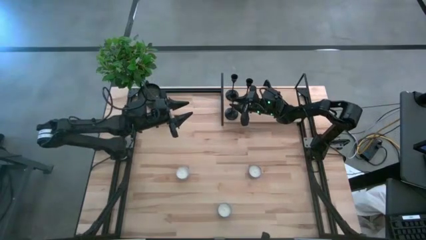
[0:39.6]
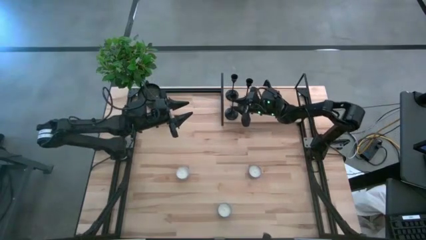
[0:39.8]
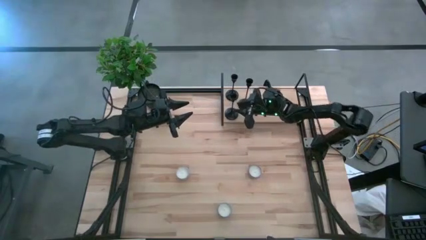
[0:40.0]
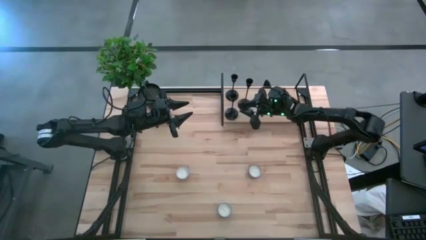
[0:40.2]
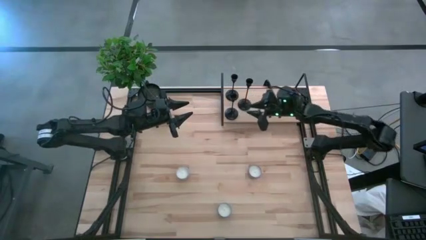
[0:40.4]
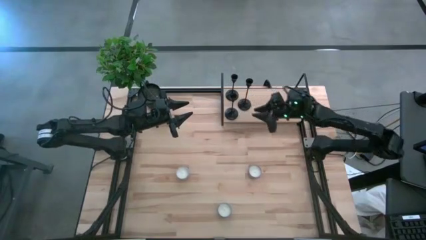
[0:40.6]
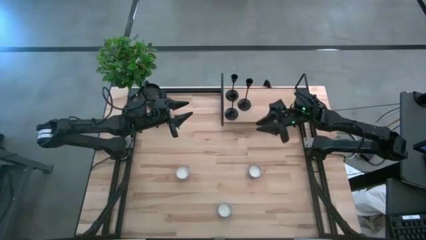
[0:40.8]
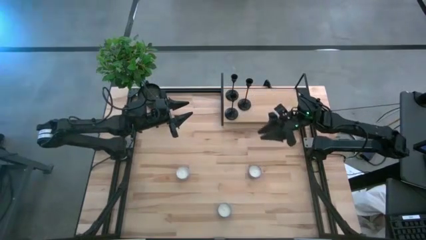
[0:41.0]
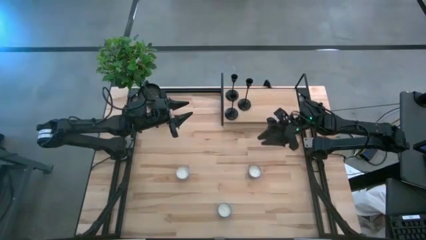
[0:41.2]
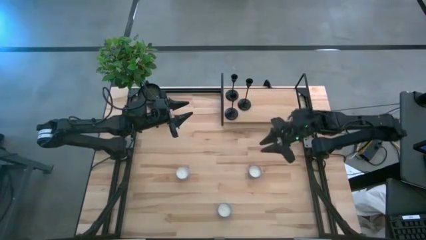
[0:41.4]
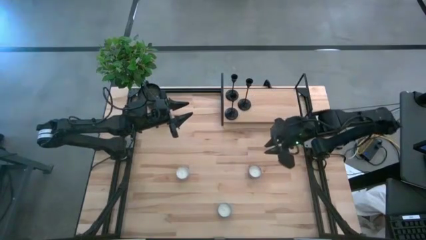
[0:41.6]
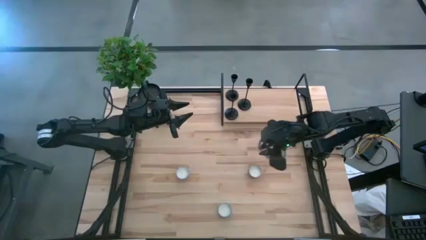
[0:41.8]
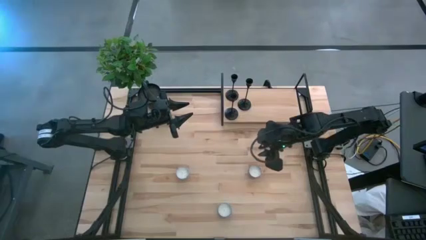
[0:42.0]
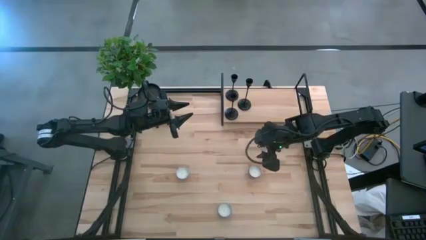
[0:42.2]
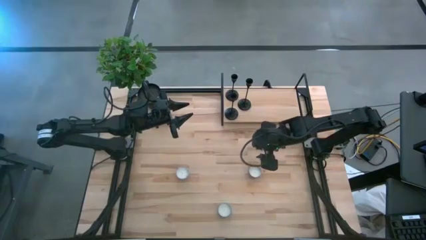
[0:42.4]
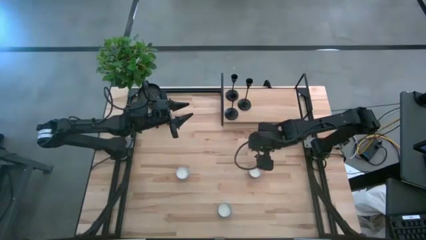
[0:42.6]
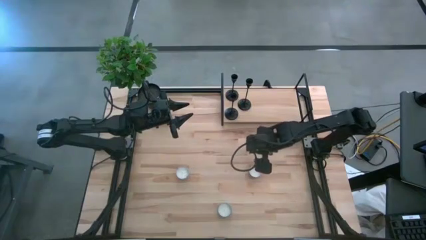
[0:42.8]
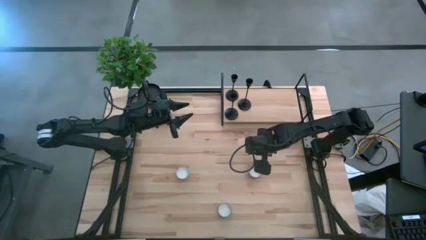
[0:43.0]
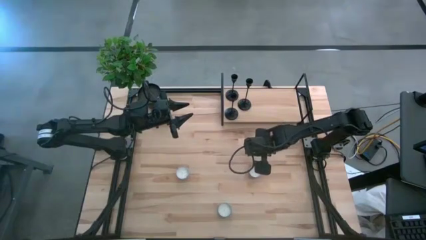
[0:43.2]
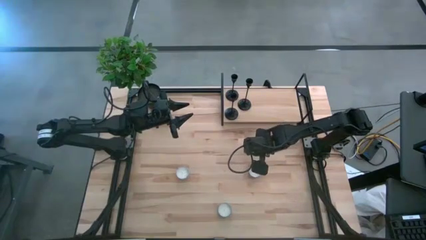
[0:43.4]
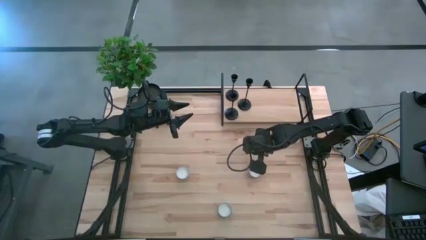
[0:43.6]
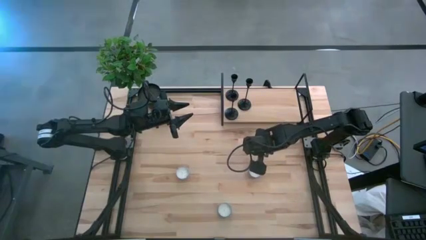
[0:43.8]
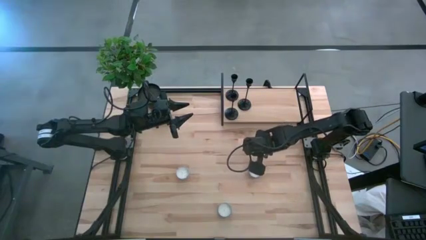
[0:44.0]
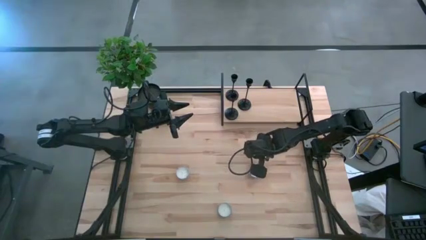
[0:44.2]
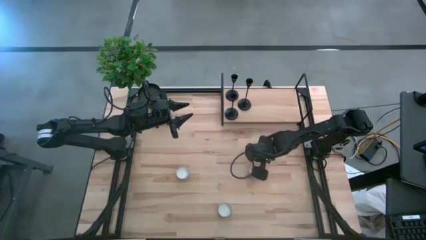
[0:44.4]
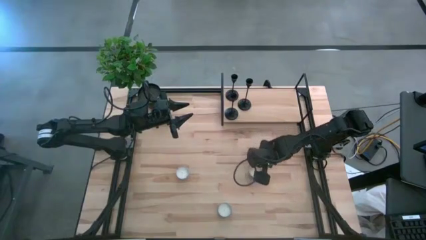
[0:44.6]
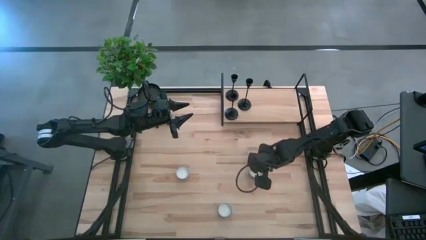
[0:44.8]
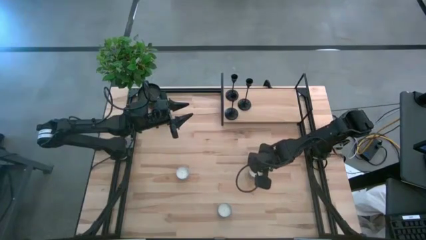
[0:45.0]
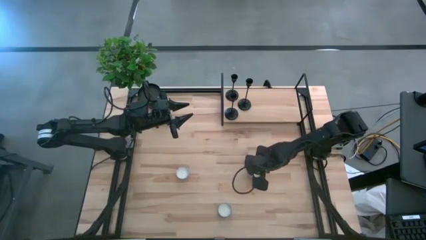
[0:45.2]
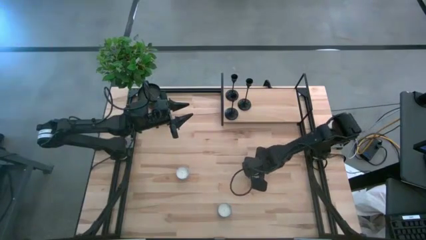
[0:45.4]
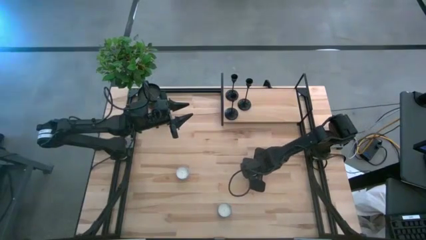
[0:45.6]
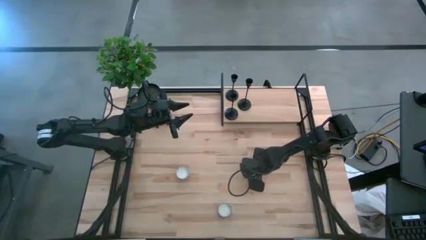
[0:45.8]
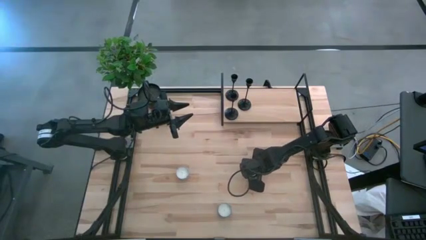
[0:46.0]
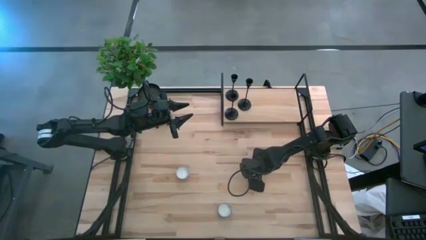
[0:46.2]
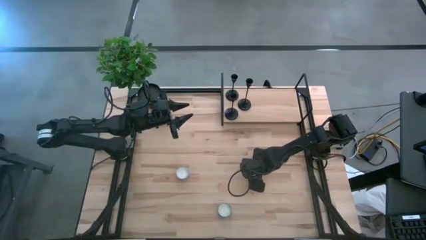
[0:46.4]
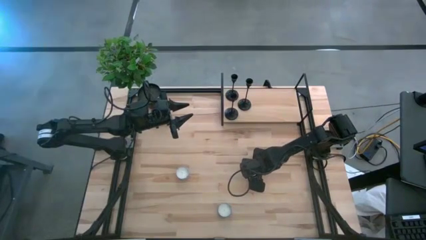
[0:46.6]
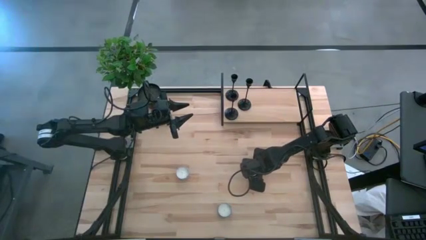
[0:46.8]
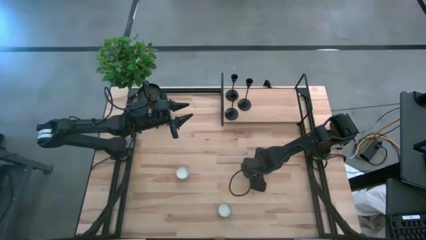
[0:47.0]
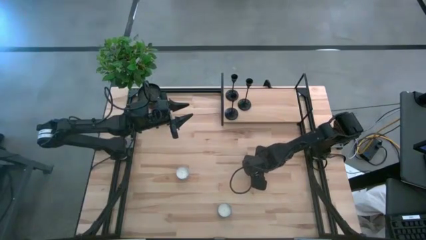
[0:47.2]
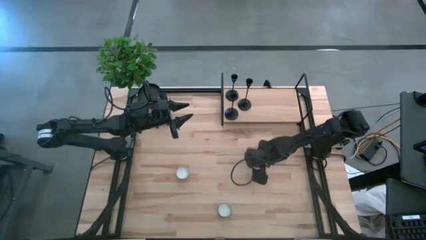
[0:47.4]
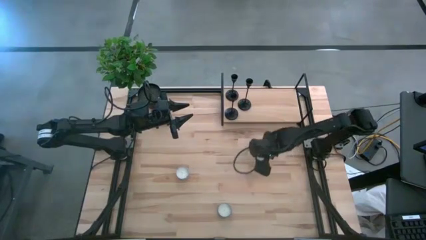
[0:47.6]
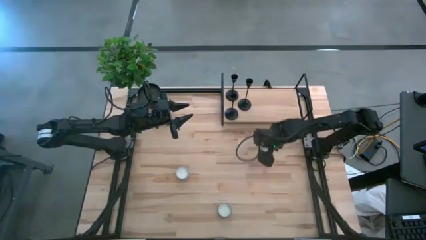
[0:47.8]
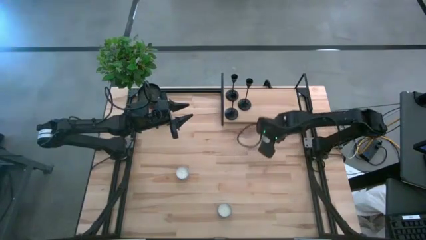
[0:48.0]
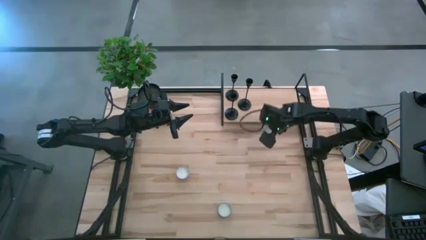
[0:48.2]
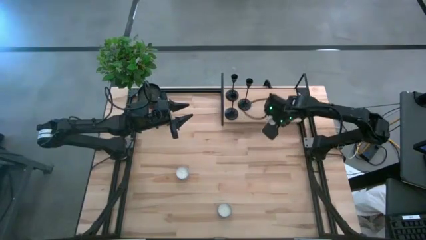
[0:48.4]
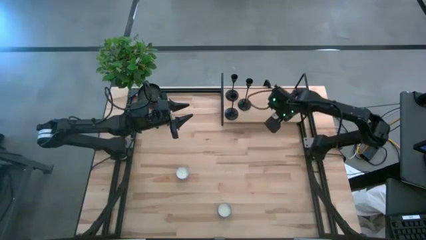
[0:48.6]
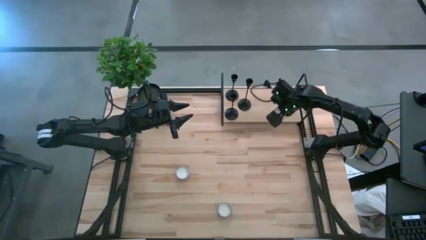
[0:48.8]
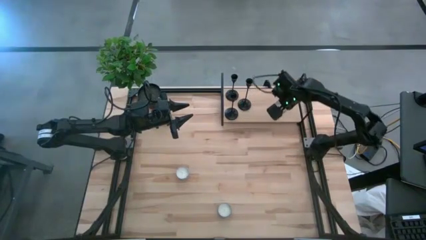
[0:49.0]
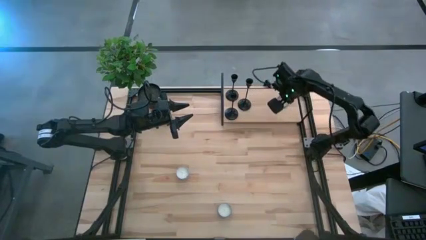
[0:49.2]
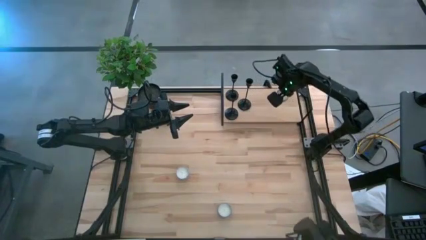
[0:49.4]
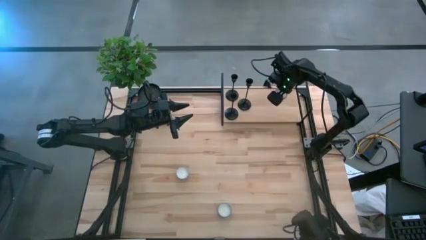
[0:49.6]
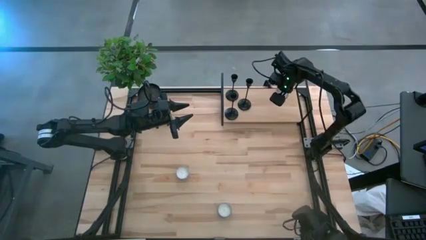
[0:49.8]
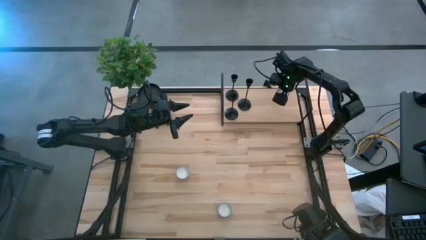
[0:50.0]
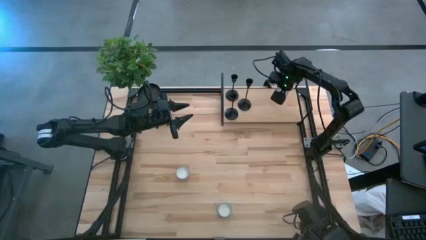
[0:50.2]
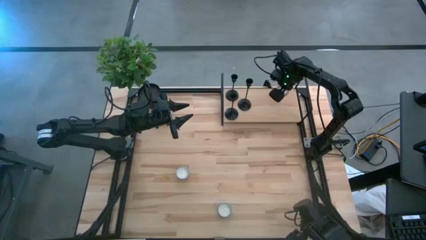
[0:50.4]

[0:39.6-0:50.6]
Task: Pick & Place candle stick holders
Put the top right pink scented candle on the shelf
